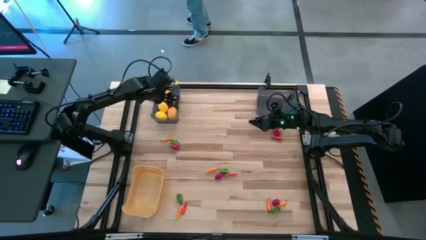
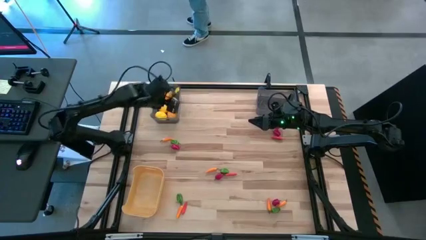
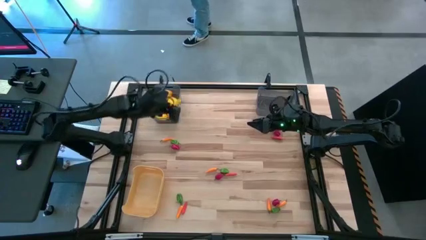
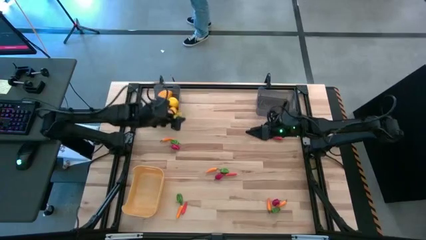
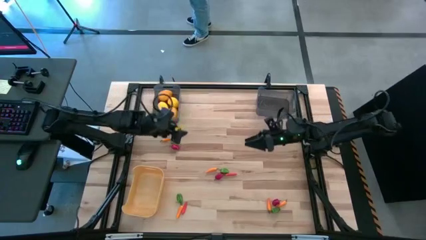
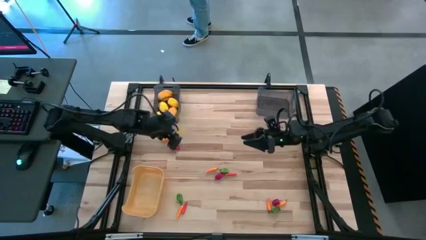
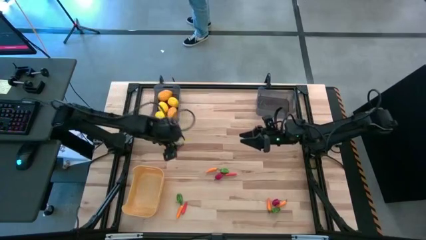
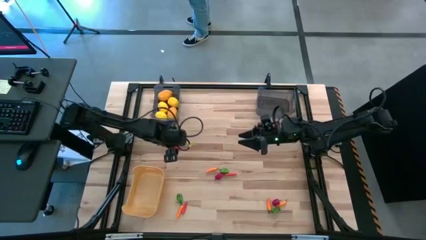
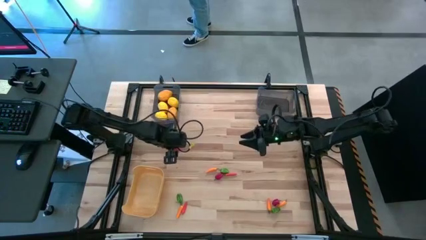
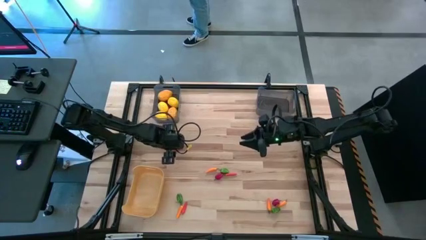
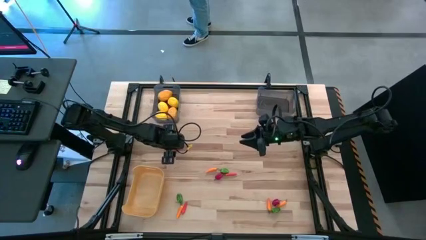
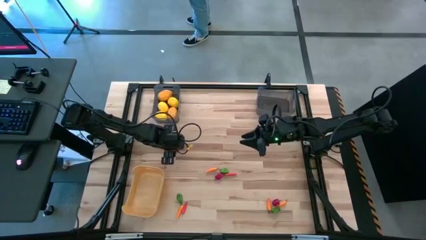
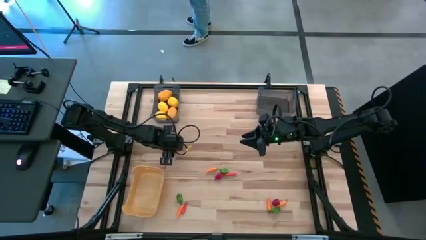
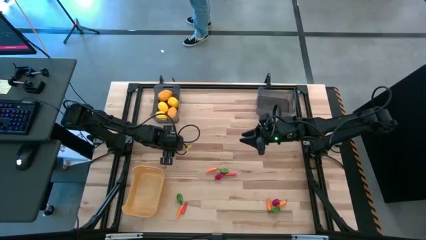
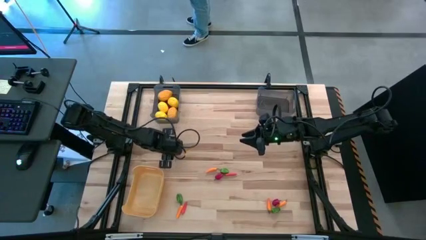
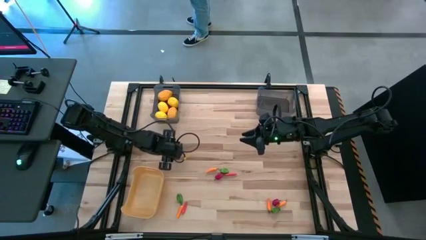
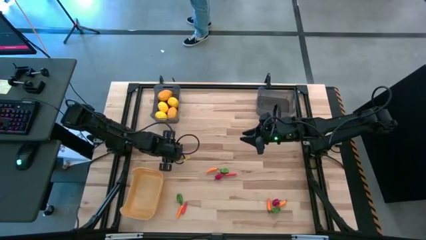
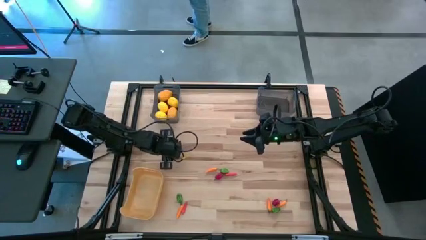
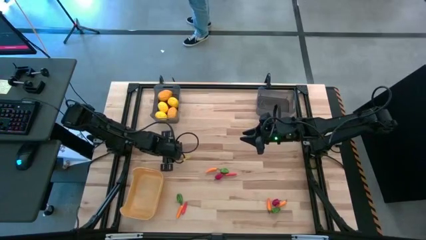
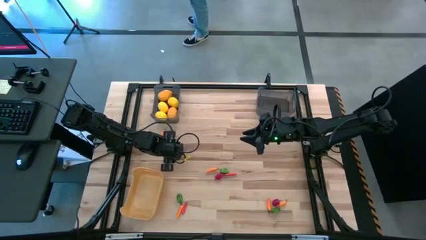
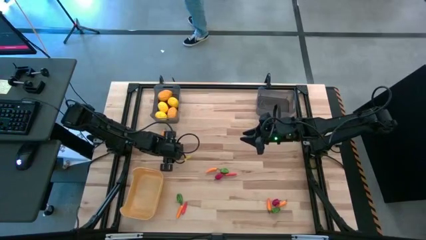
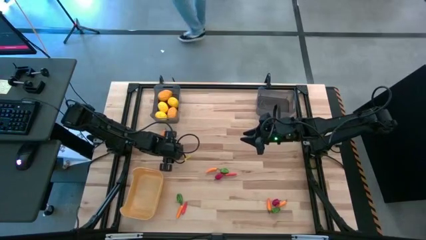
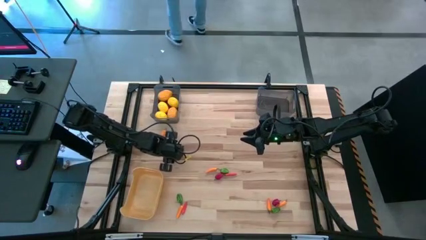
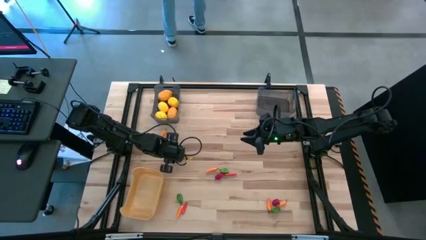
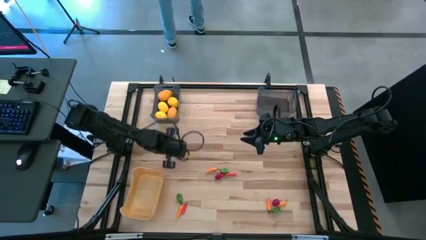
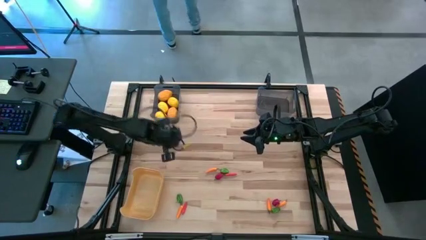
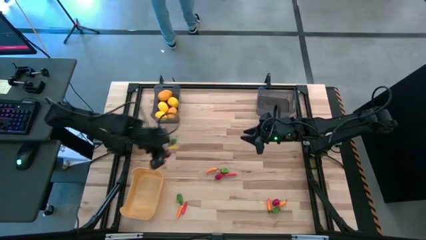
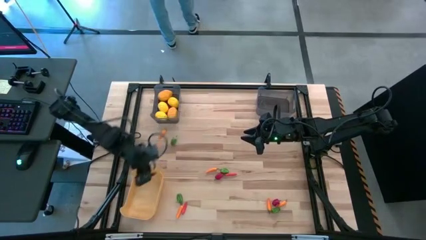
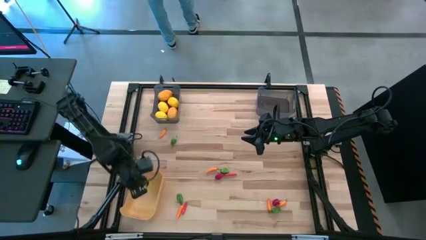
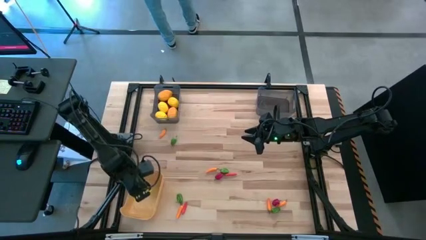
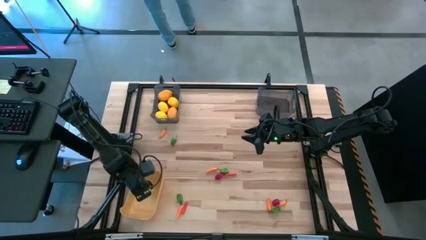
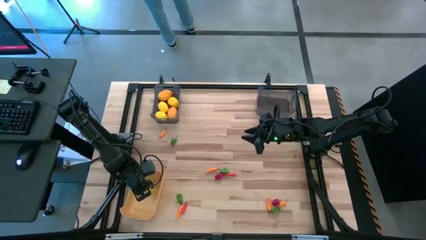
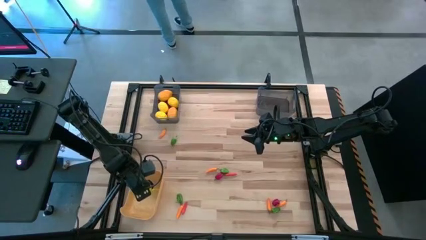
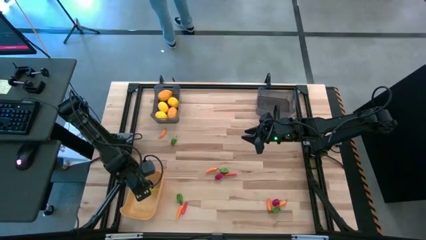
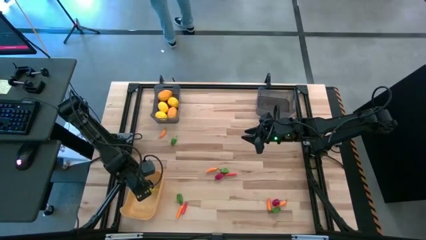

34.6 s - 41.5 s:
Task: Sort produce into baskets
Put the top left red bell pepper into the yellow bin

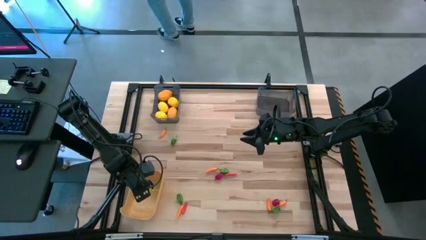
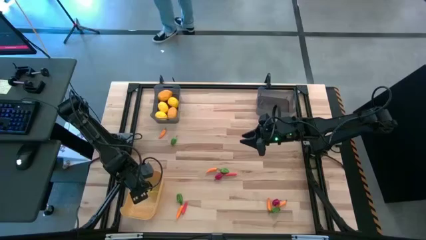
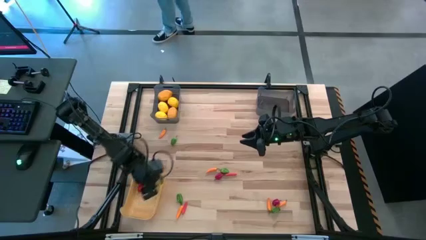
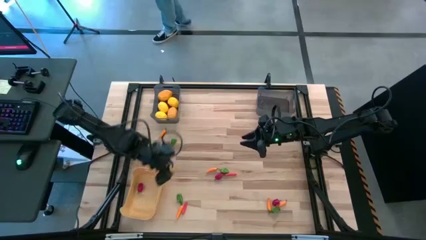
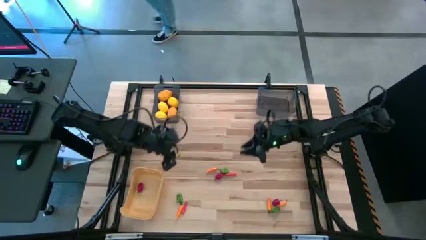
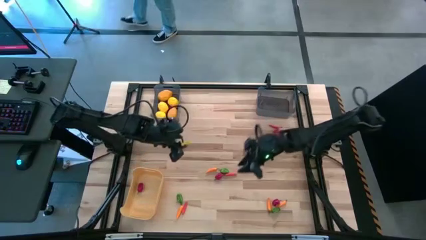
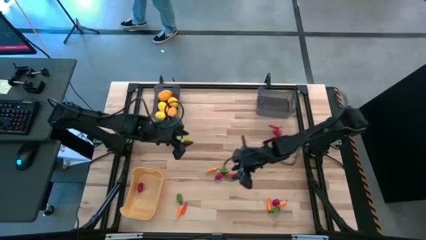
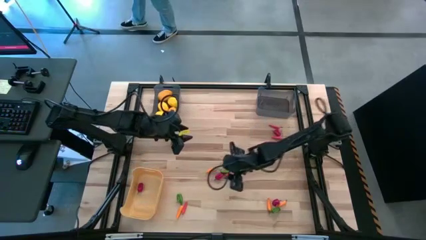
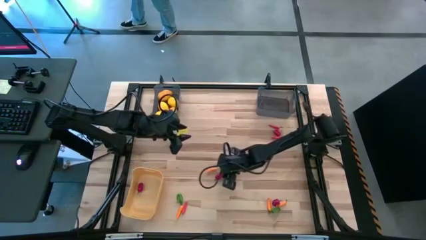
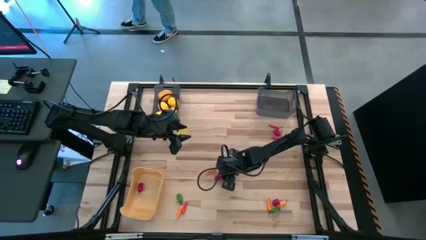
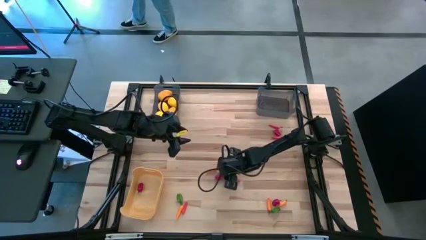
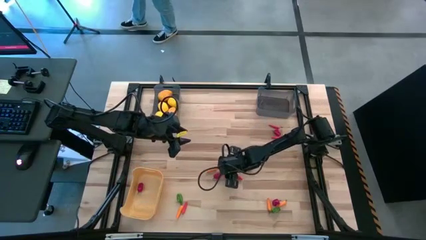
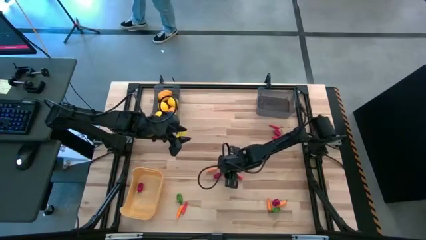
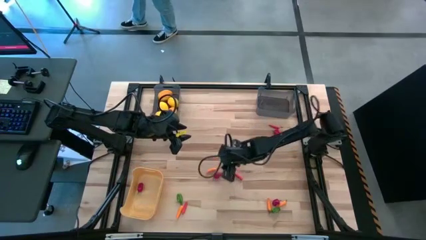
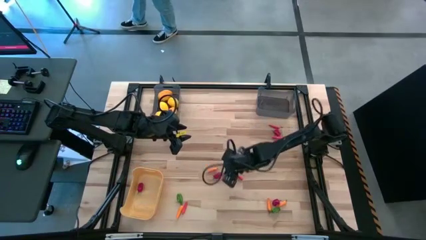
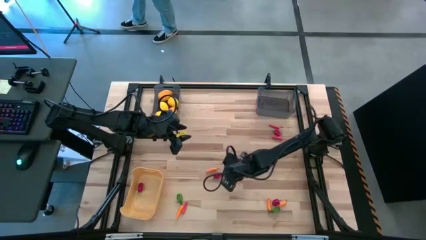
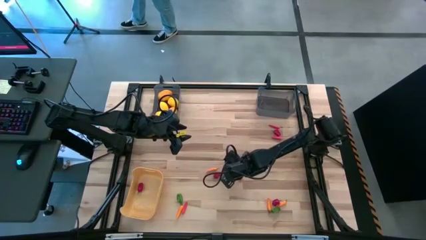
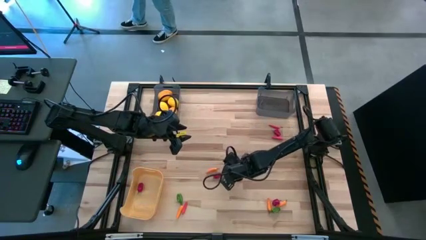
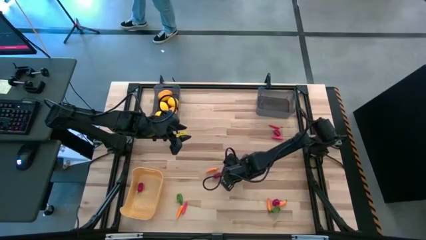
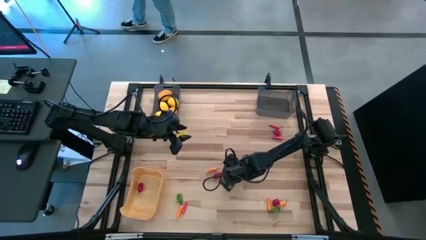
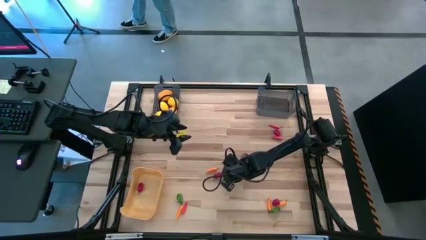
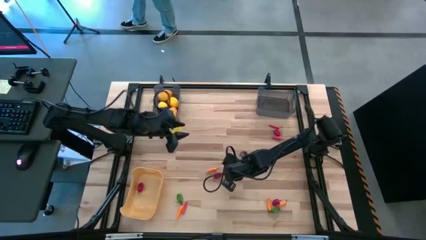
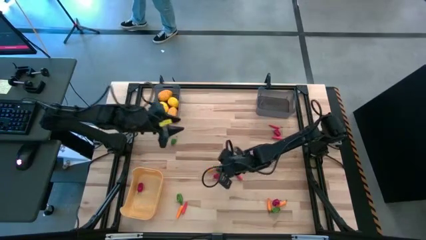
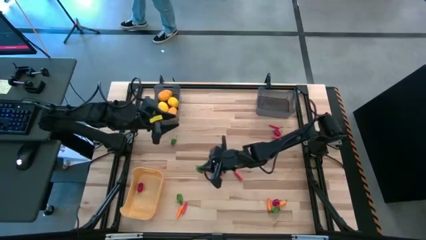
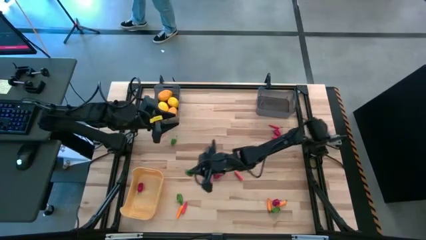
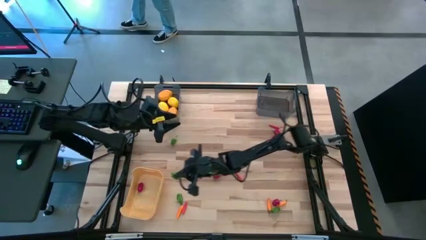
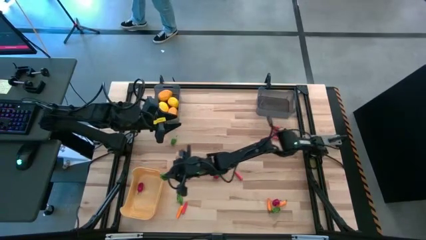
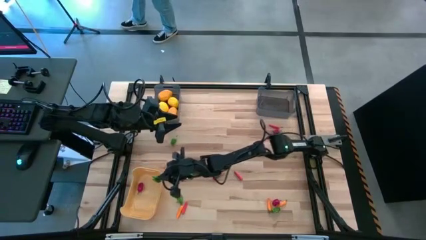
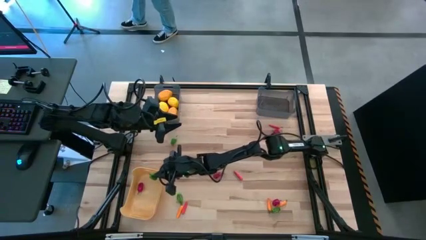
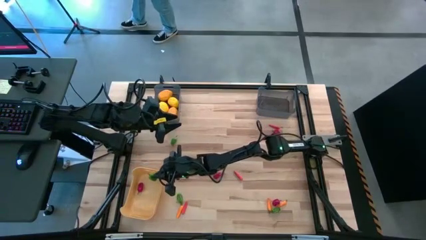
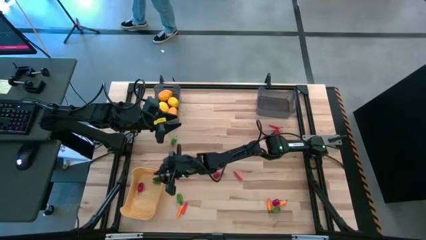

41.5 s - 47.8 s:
Put the center green bell pepper into the yellow bin

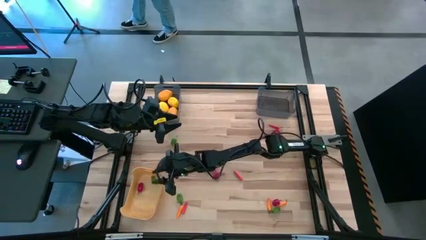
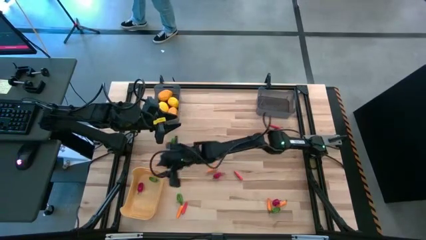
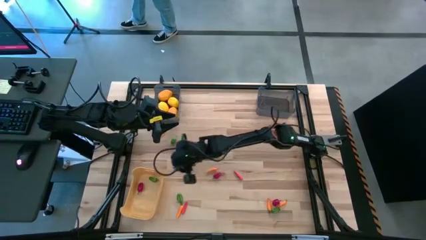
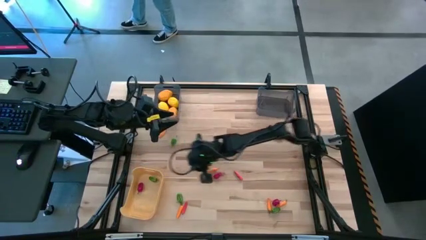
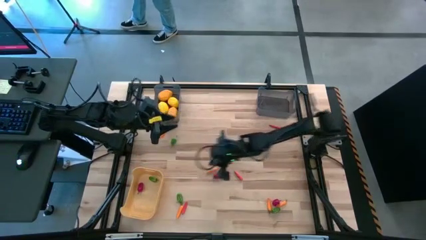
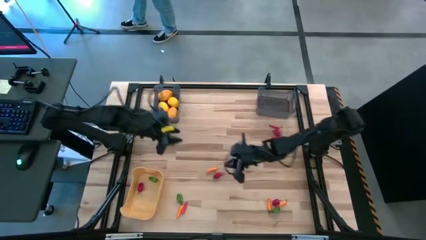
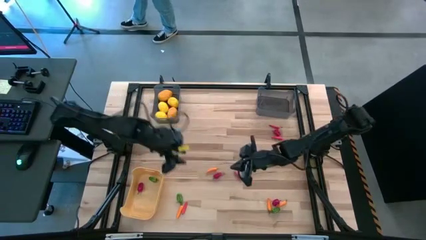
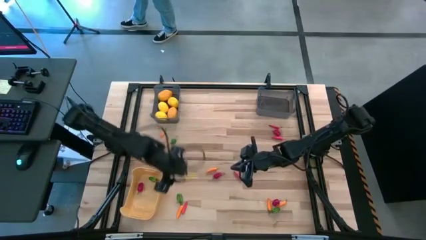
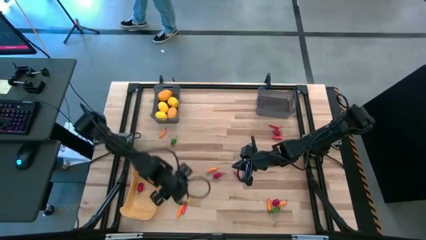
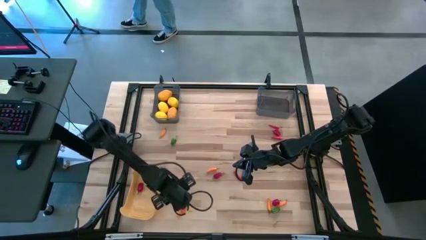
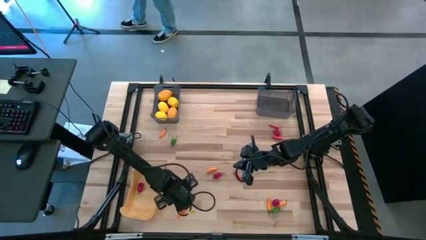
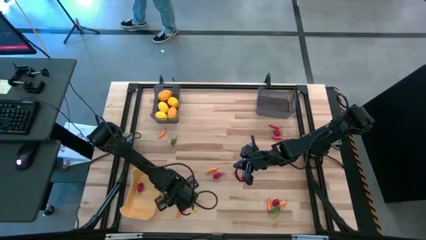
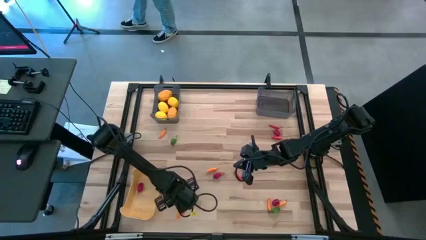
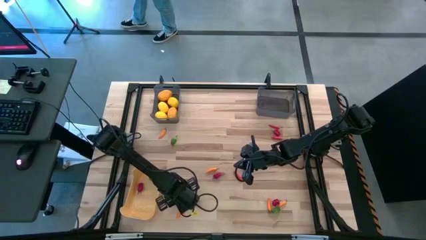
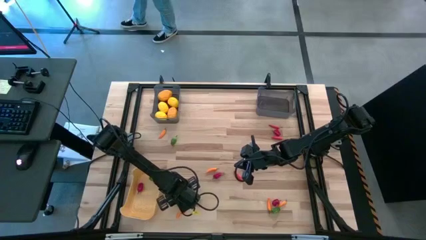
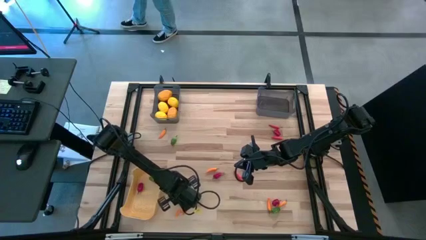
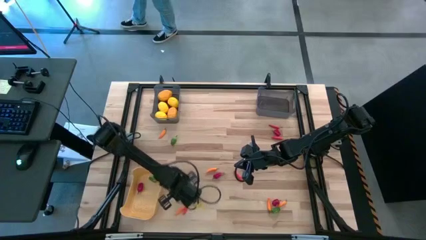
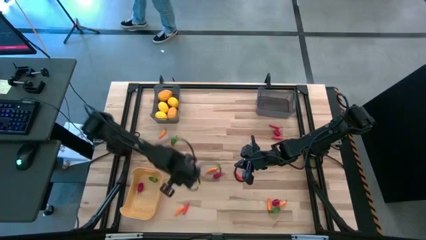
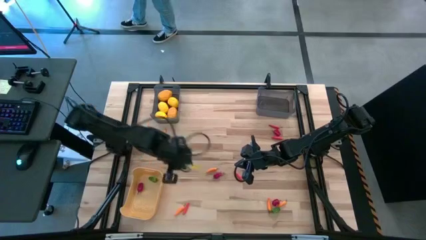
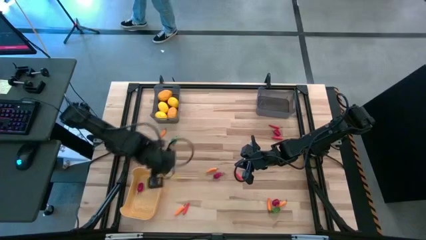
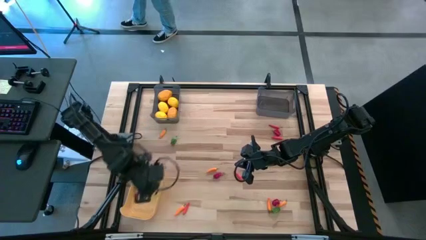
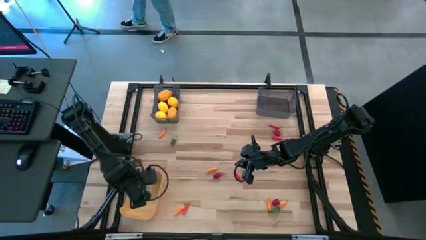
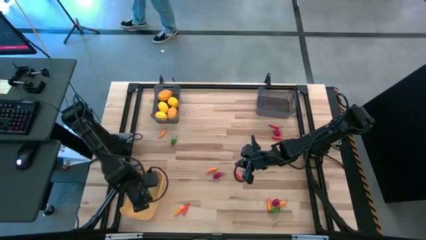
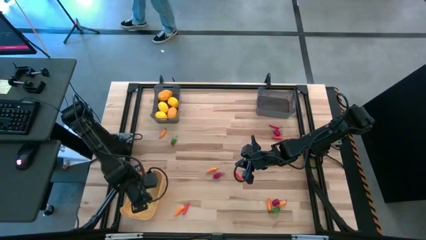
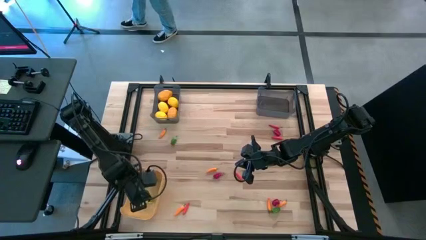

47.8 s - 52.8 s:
Put the bottom left green bell pepper into the yellow bin
